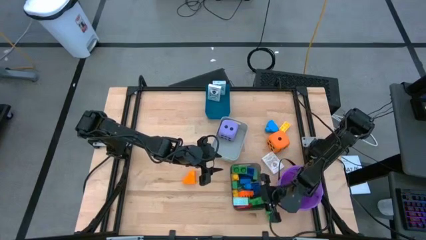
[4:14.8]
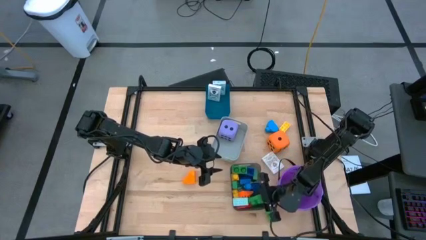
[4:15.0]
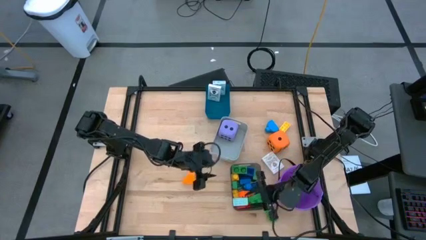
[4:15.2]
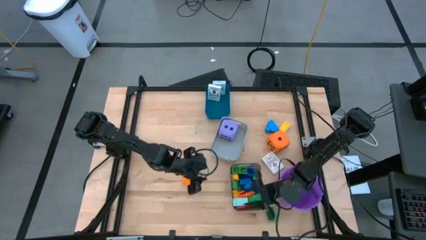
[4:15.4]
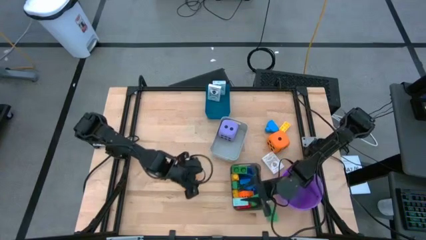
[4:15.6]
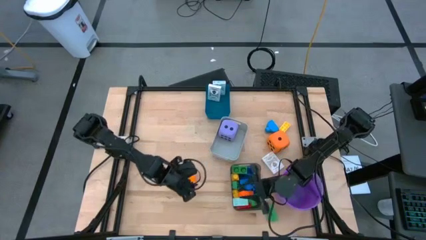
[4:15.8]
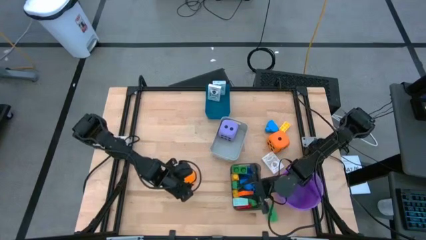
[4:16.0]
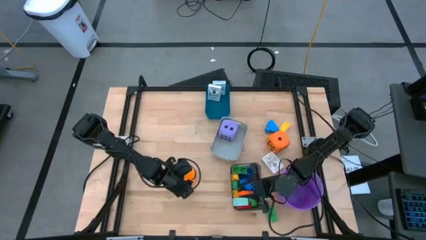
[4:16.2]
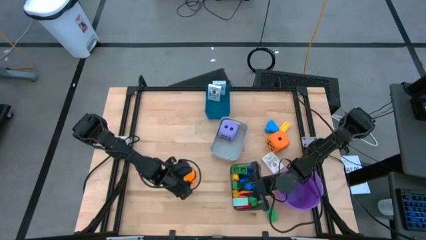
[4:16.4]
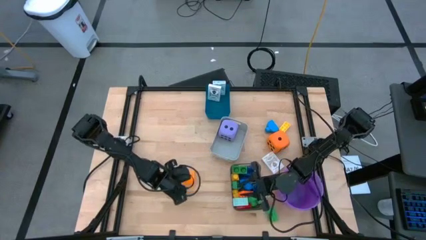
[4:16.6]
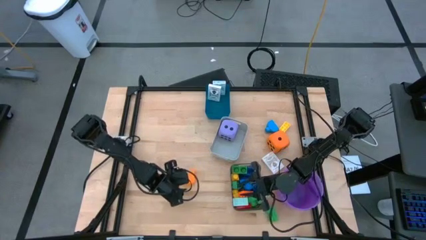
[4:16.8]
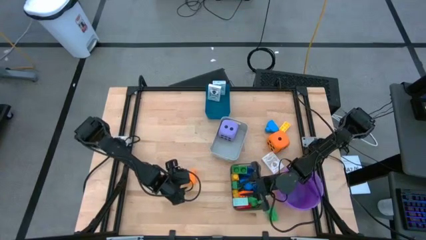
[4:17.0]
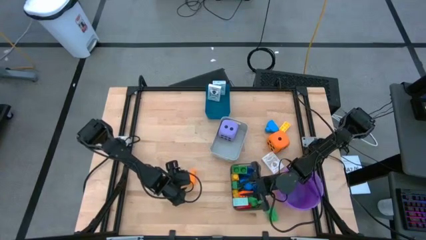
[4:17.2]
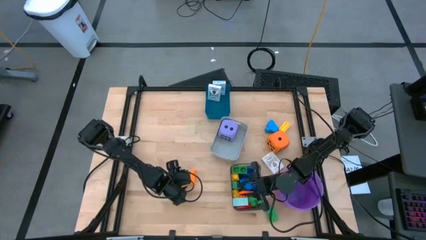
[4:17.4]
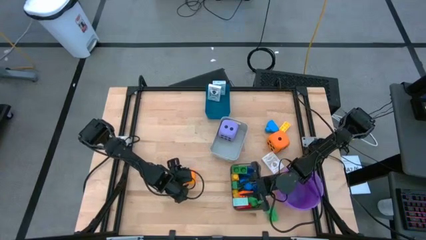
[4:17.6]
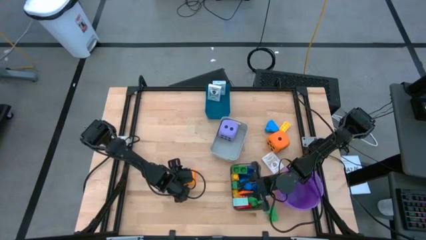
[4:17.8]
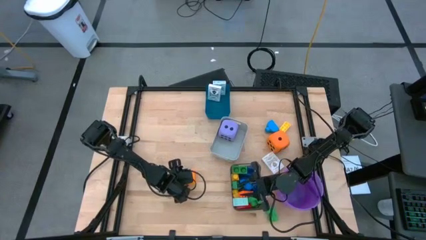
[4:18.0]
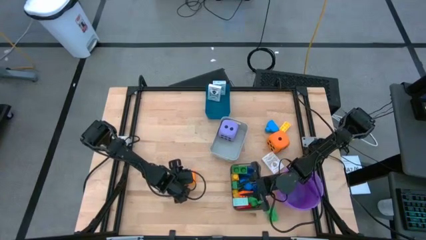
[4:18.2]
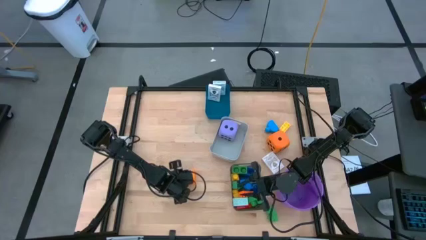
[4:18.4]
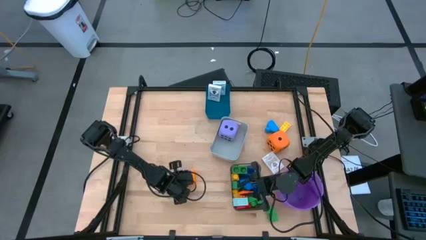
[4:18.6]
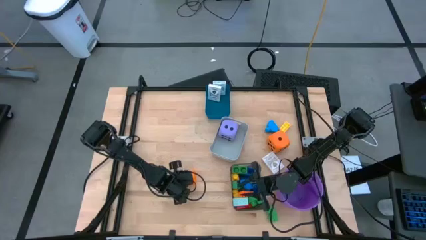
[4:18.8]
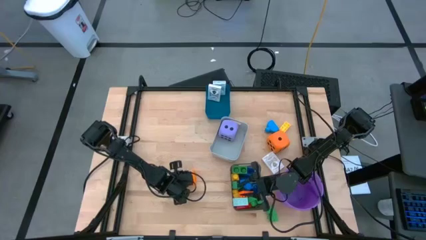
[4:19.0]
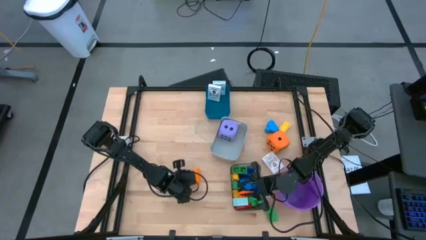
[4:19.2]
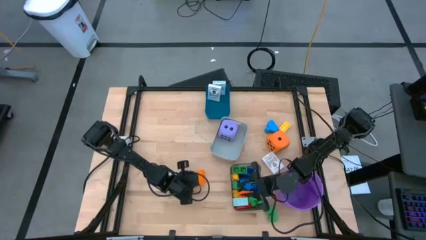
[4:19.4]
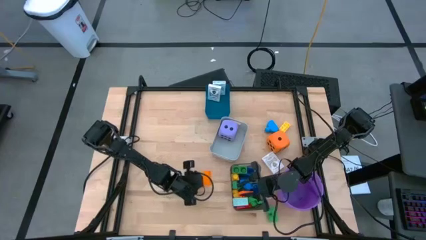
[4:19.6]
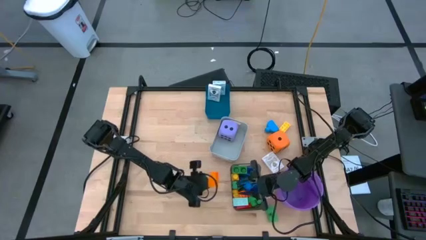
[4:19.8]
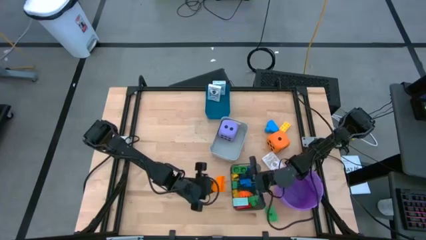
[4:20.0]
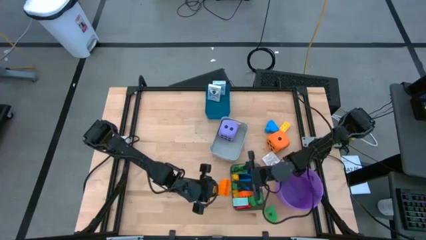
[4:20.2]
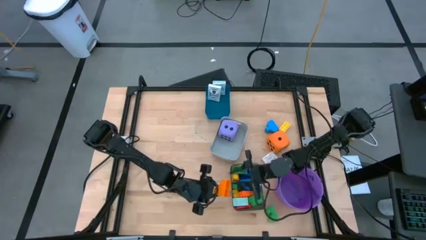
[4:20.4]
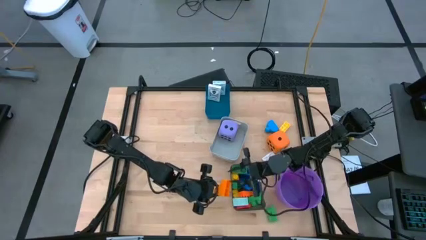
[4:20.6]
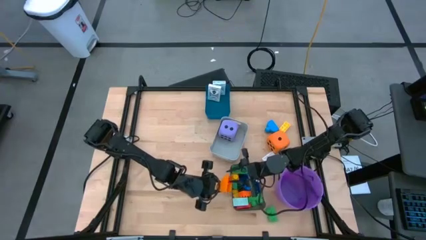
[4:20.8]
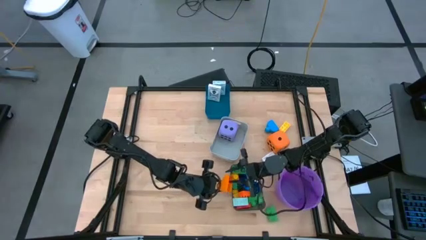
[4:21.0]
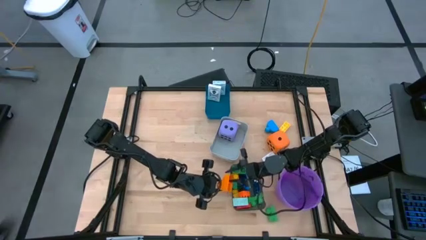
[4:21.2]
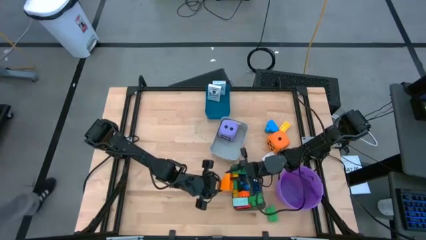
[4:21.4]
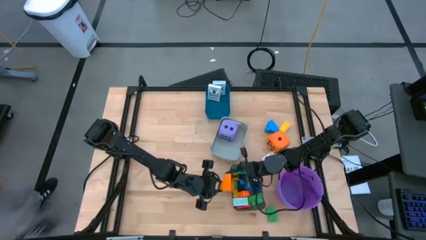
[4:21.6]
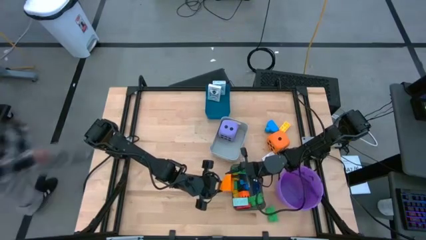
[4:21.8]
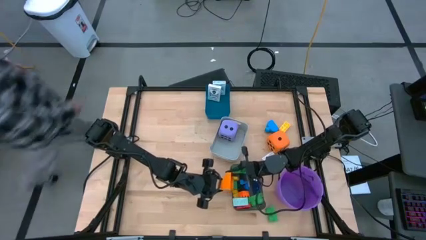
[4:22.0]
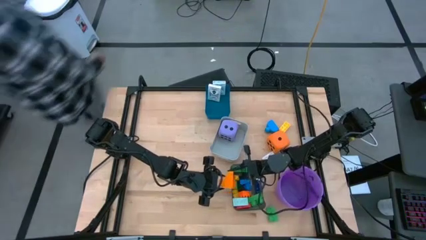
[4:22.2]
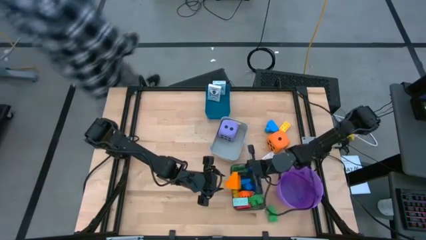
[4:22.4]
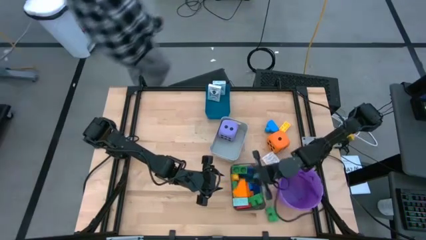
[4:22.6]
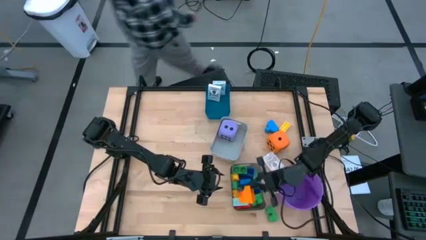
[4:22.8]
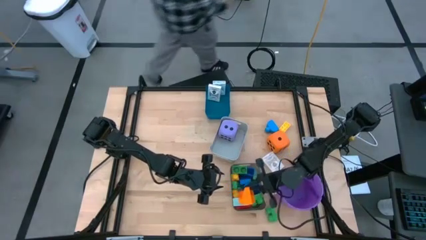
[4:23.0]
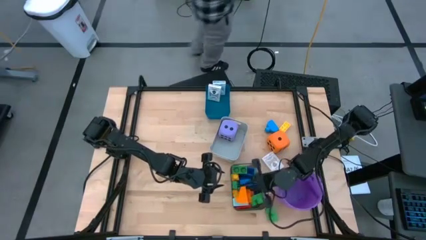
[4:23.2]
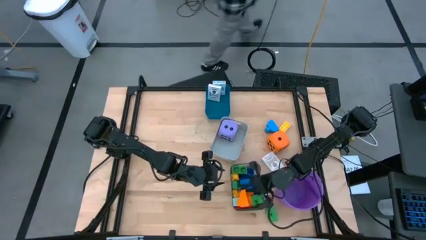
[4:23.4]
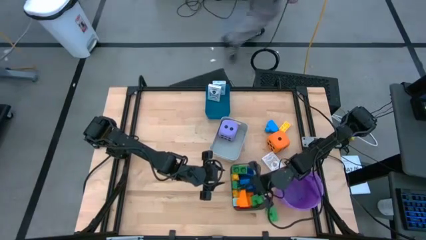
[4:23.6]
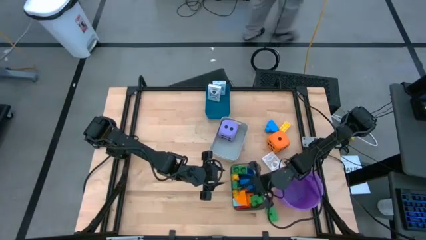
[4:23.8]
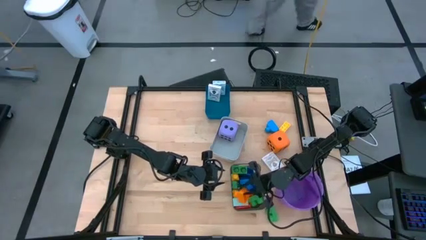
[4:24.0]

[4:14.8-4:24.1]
Task: Pick & Place Toys
Put the orange game piece into the black bin

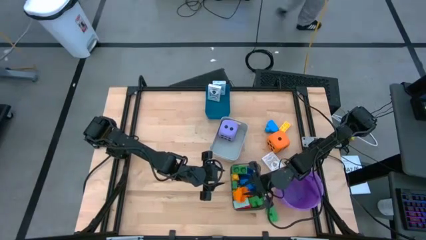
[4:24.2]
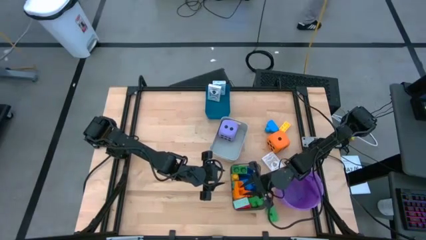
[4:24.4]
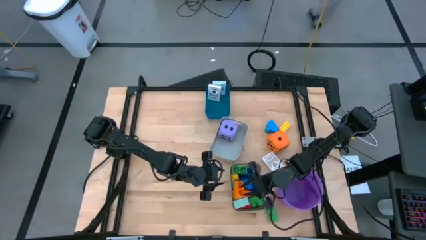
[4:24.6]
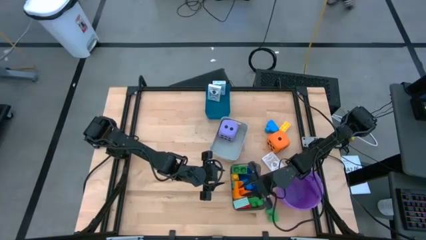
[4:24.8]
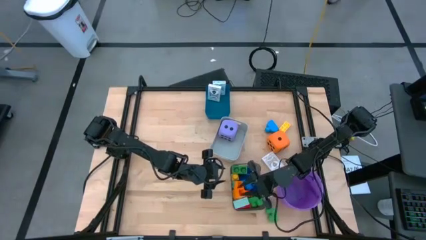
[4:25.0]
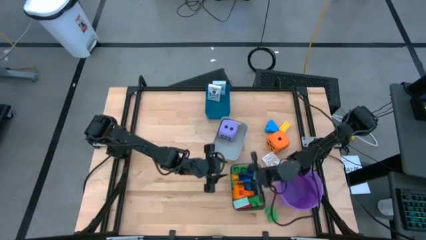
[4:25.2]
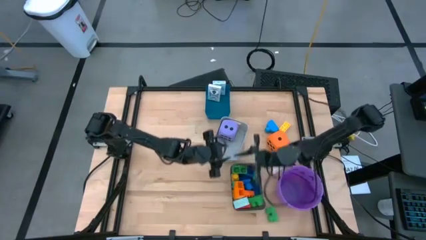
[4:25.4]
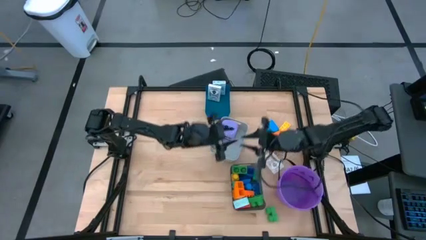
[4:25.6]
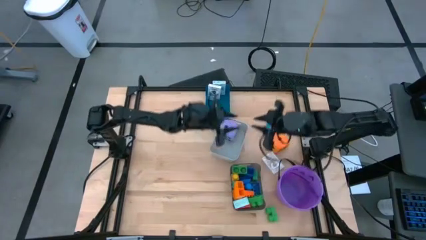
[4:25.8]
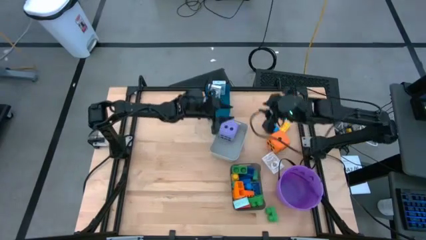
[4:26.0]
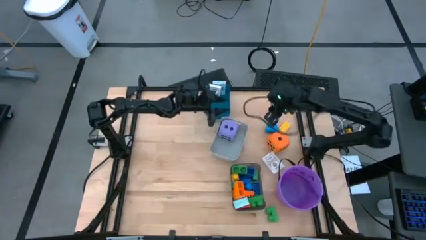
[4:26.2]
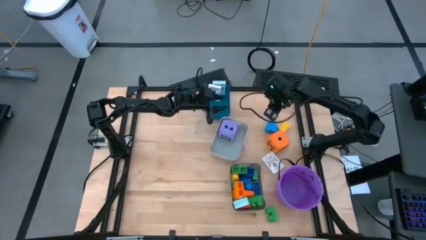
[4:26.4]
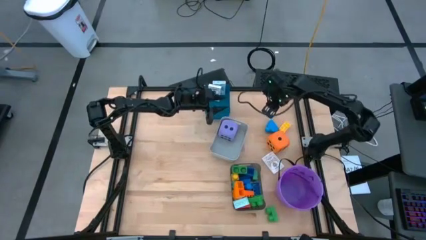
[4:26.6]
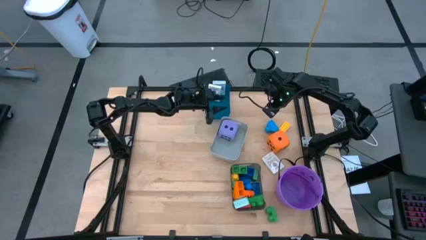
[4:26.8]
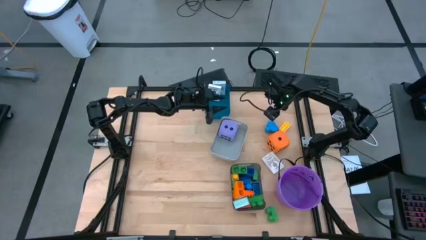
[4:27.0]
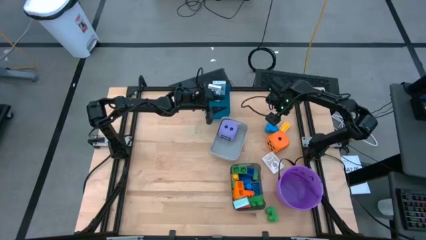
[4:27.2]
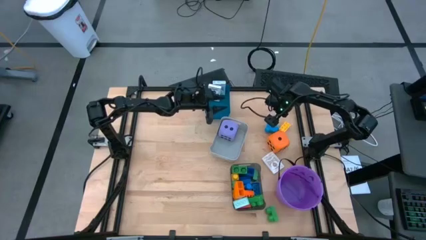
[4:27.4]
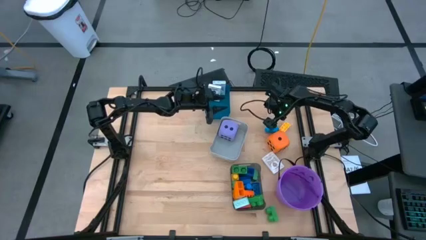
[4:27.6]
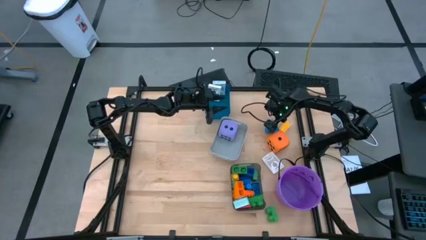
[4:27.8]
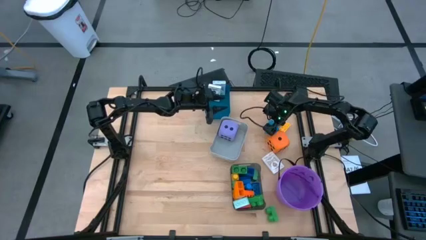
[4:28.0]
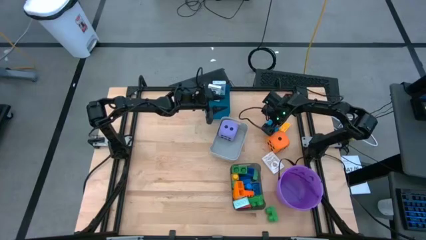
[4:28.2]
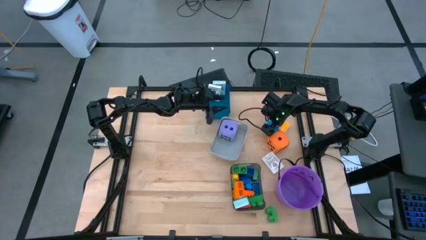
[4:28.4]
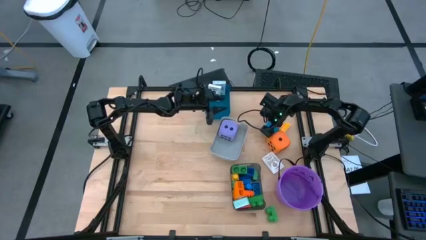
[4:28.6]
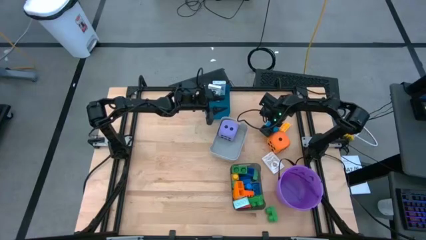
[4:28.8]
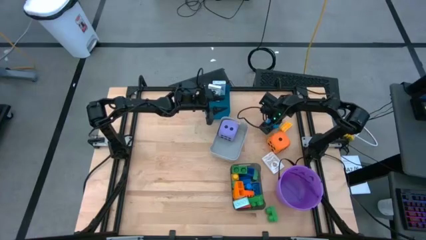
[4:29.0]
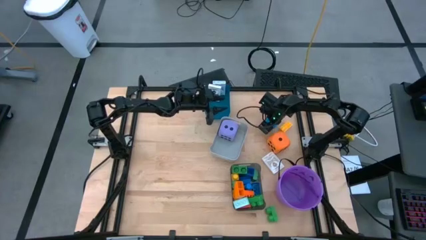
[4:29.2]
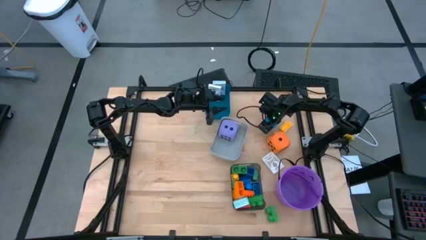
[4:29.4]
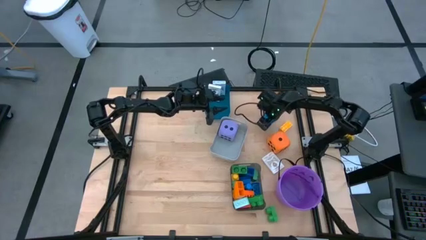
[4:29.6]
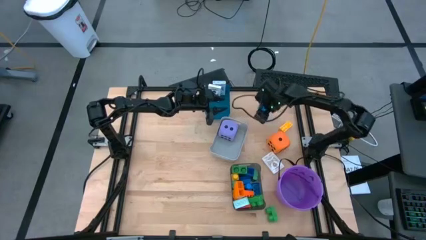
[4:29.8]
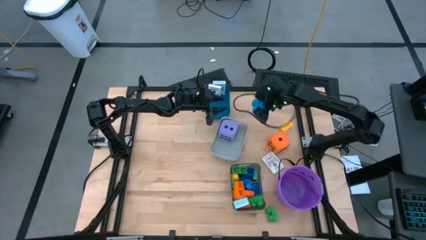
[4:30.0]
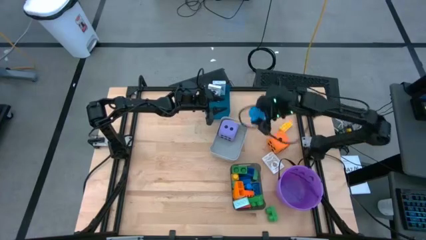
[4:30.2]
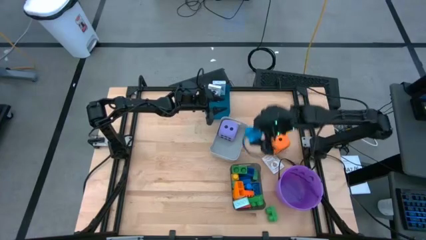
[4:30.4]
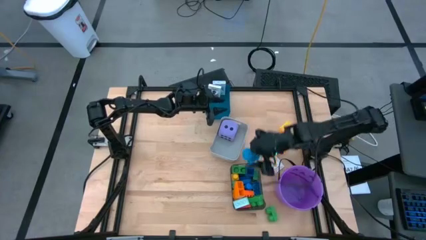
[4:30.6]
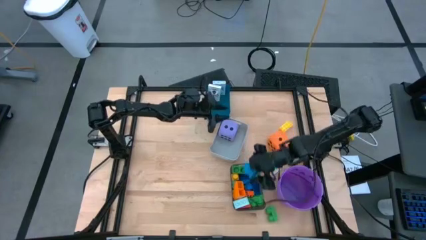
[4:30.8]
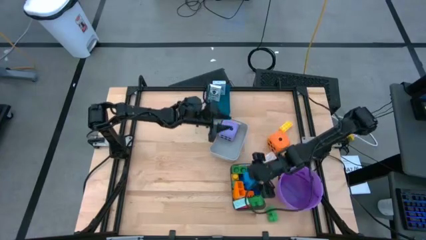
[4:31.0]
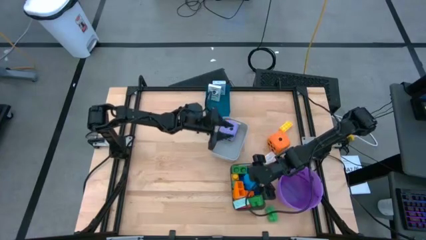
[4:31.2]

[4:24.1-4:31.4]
Put the blue game piece into the black bin
